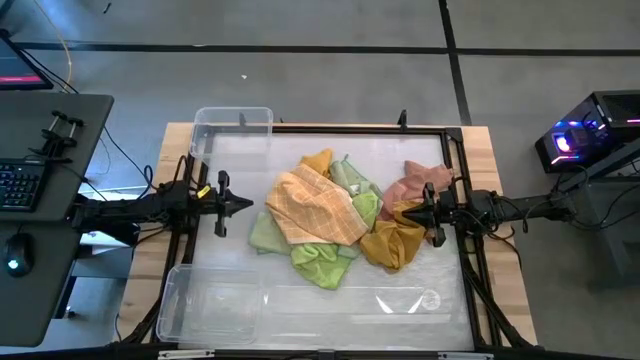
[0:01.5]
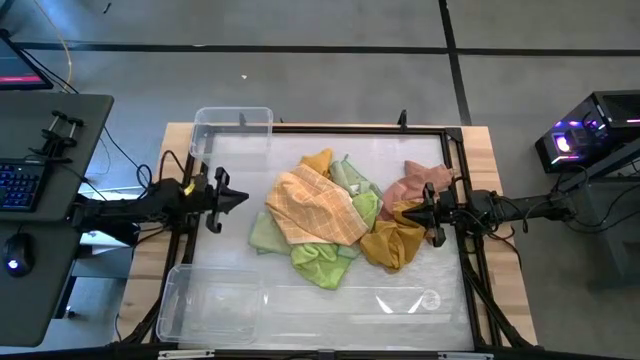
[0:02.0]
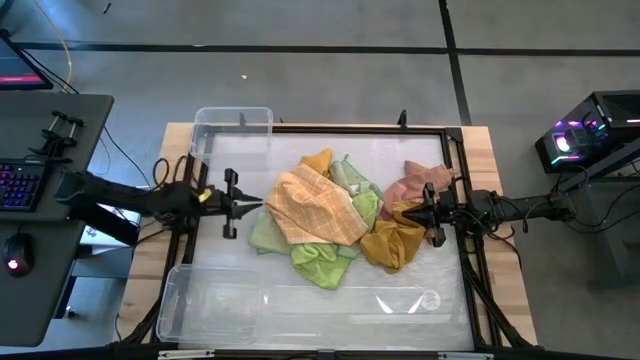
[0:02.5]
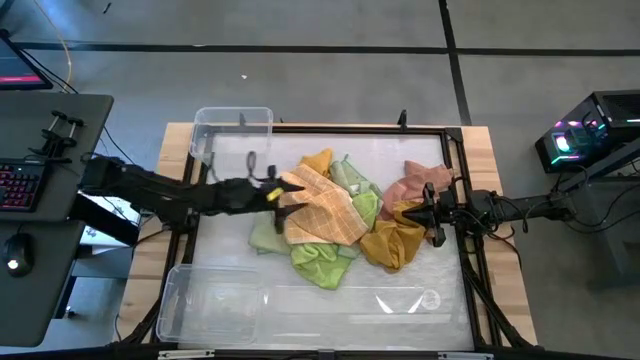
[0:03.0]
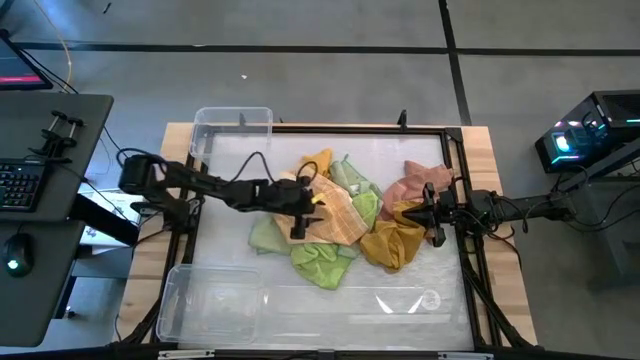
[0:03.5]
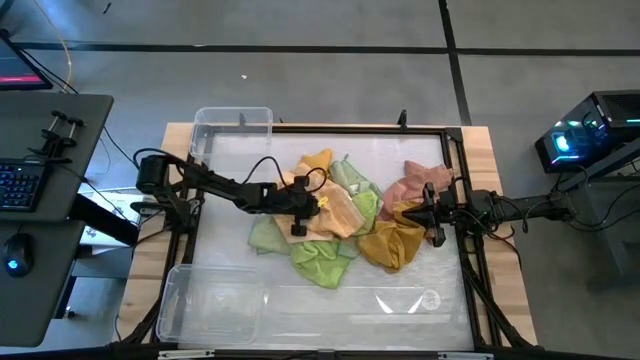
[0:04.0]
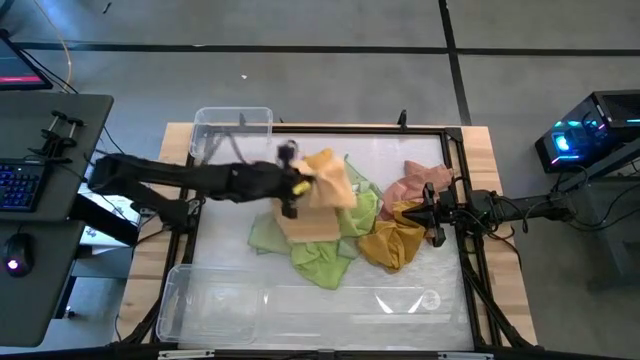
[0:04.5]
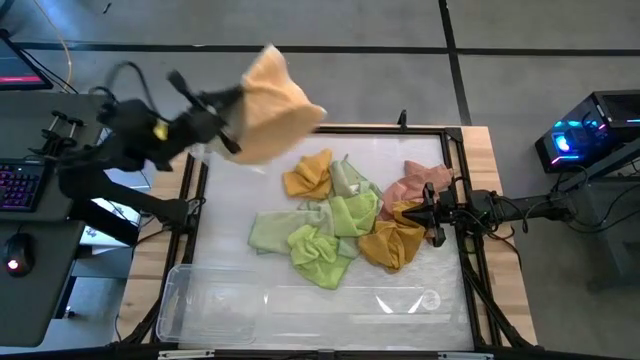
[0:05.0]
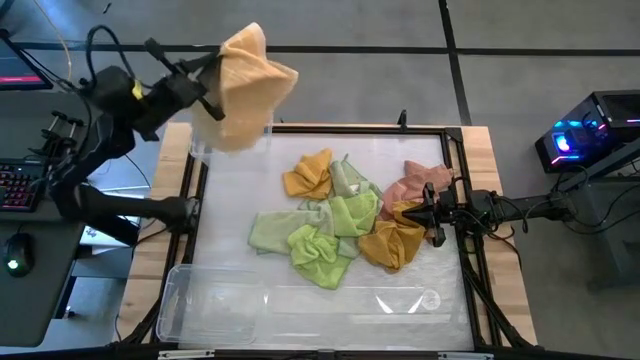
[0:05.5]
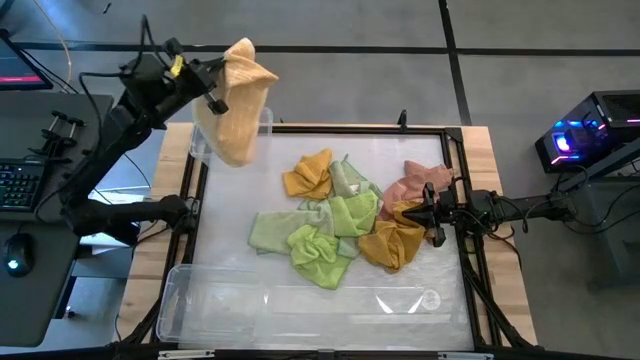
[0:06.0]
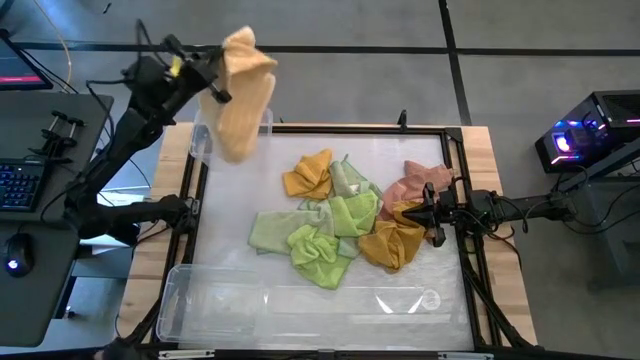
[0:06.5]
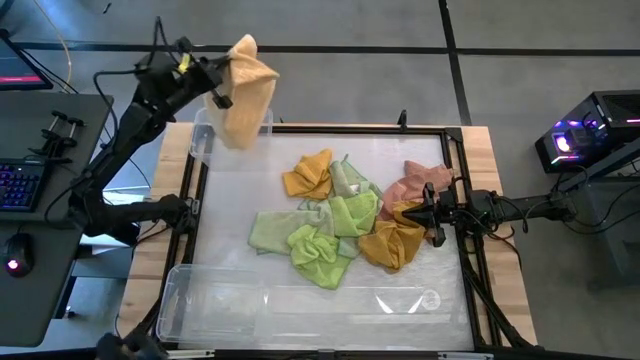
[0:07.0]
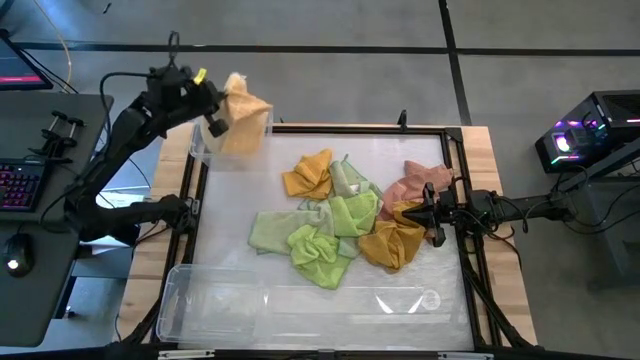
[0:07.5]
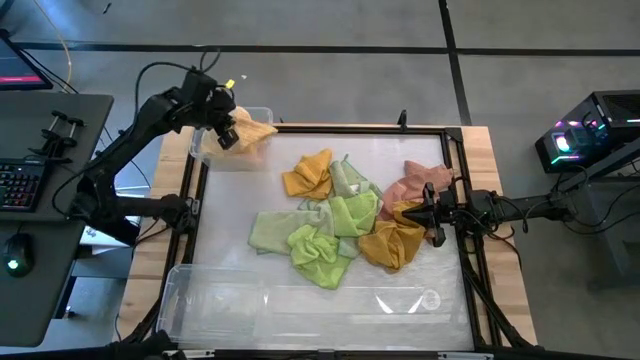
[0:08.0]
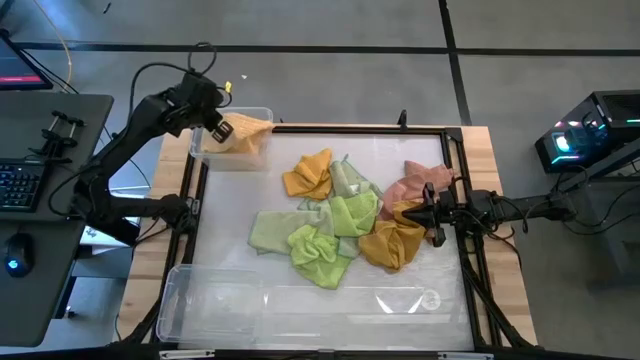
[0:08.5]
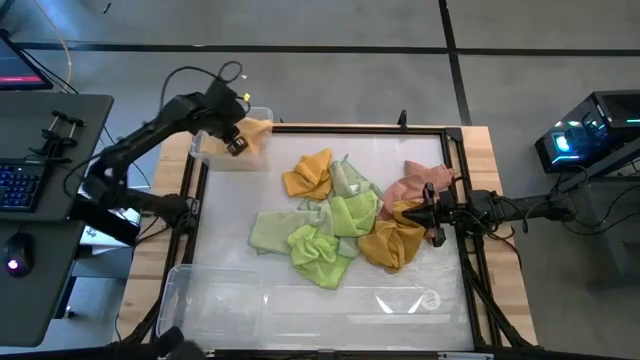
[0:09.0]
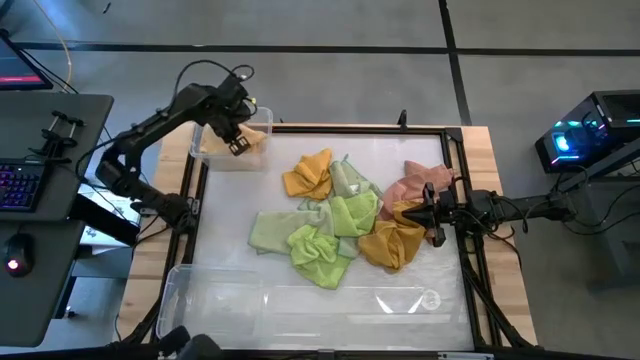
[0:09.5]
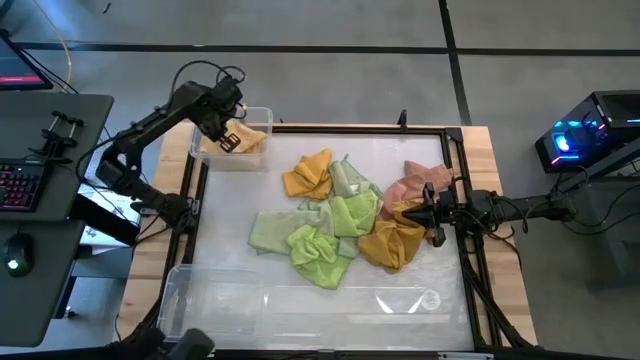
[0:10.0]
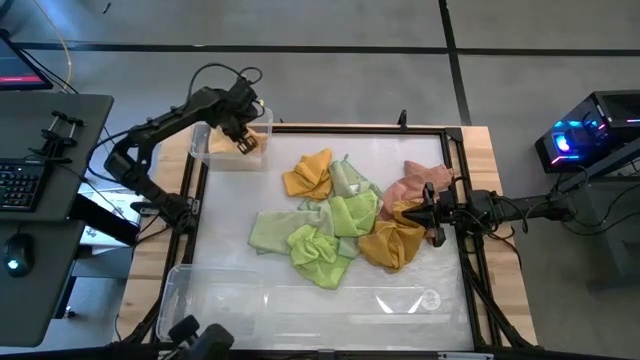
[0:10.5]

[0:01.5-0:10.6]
Task: Sort towels by color in basket
Put the orange towel into the top transparent bin

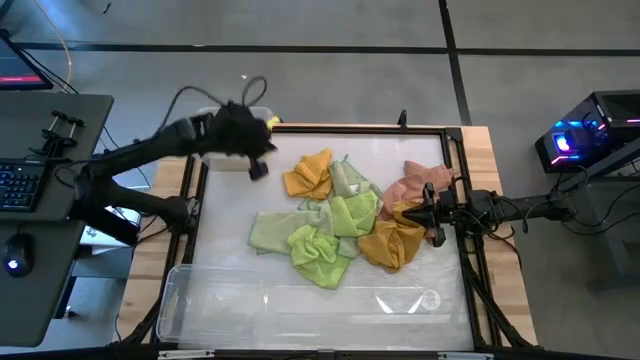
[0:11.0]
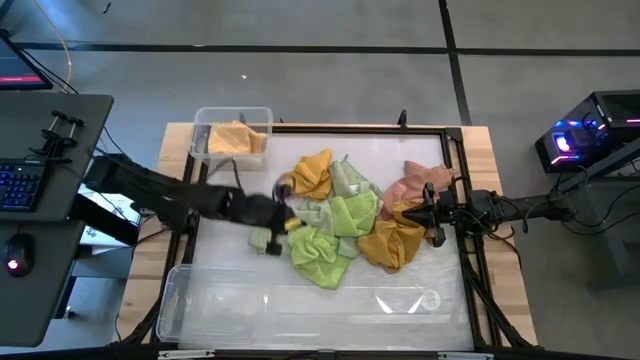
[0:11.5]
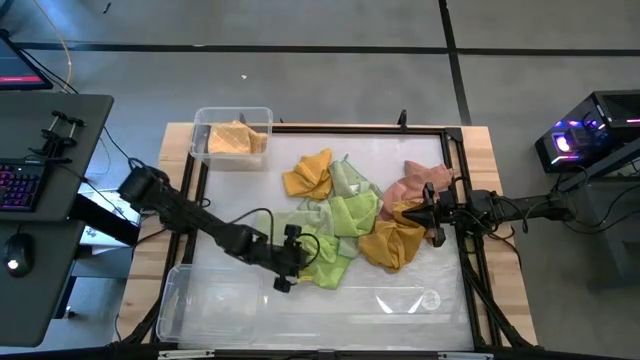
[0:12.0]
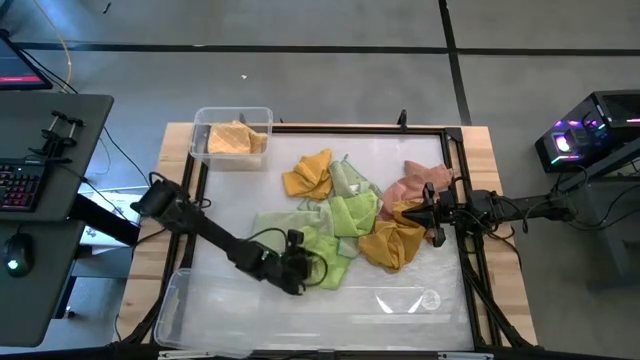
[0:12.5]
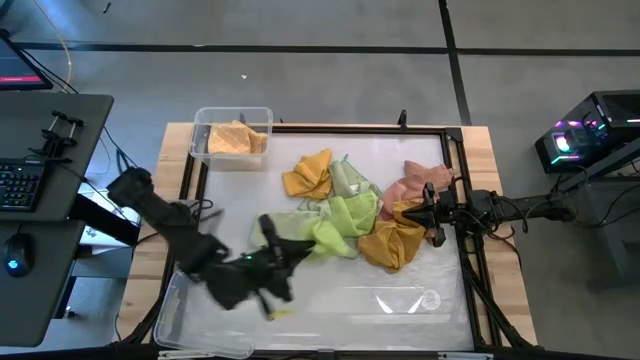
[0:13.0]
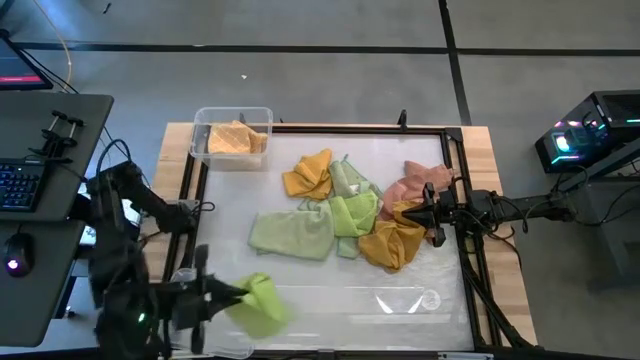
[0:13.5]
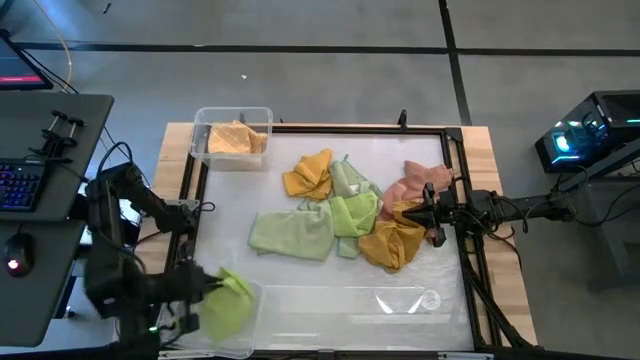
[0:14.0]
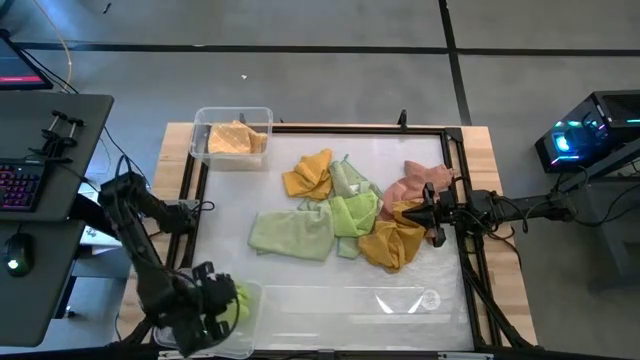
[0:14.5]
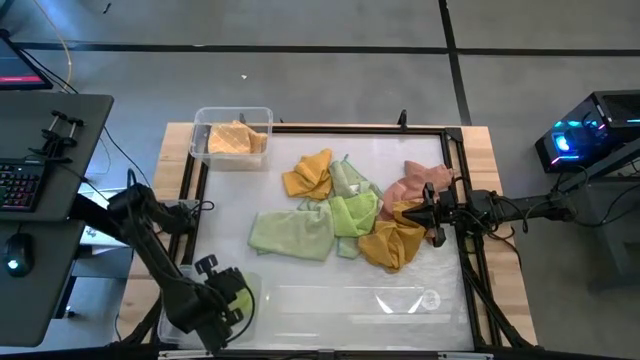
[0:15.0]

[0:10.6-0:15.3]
Put the bottom light green towel into the bottom transparent bin

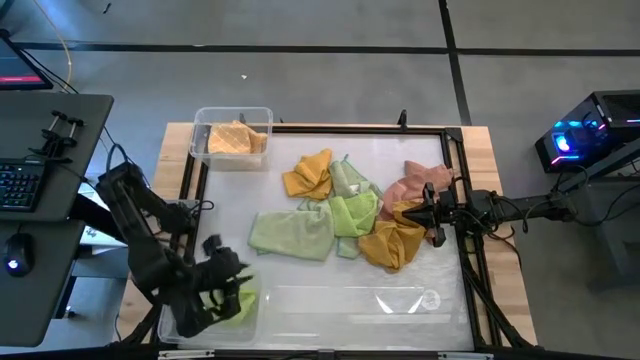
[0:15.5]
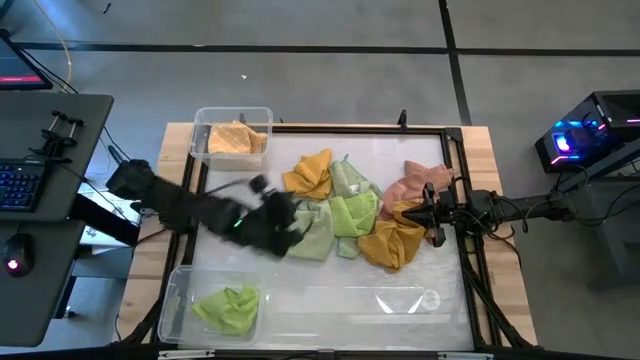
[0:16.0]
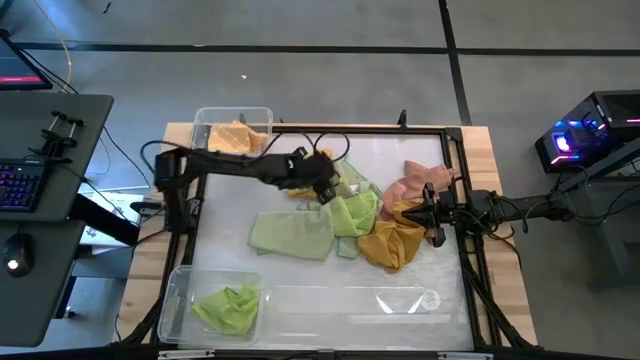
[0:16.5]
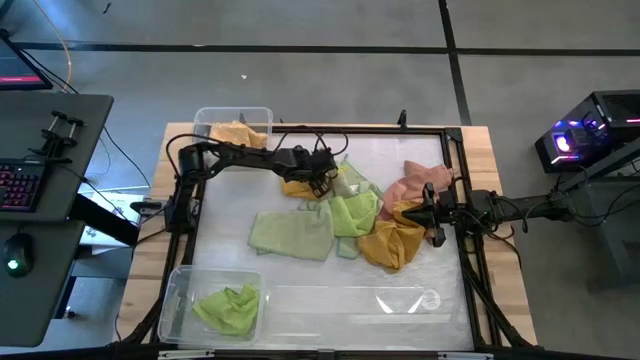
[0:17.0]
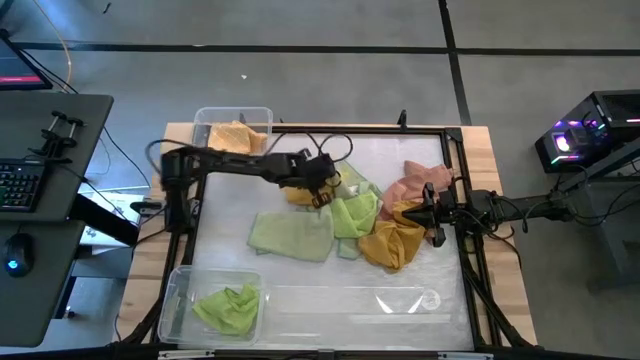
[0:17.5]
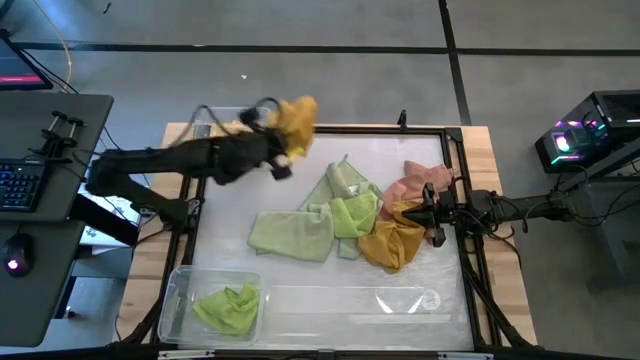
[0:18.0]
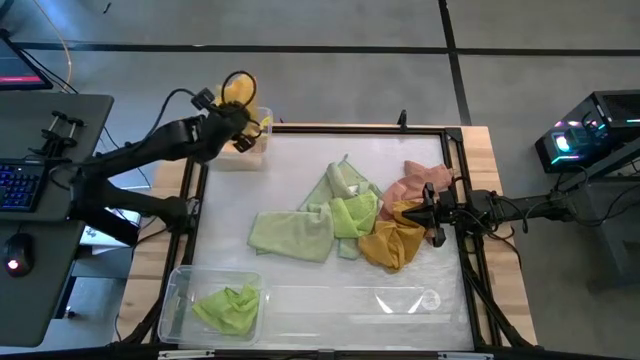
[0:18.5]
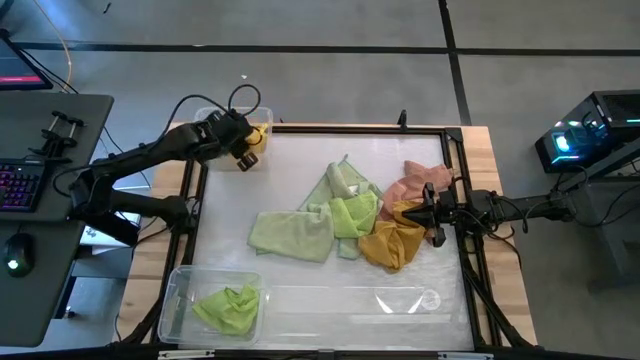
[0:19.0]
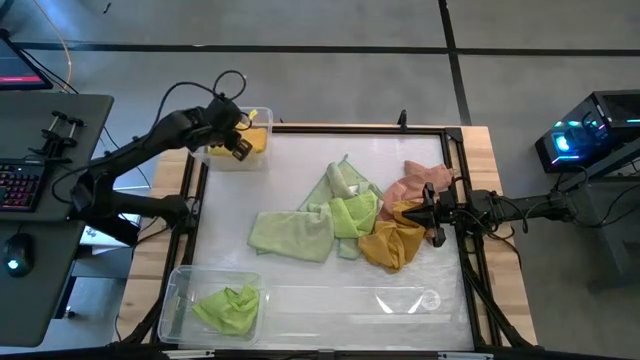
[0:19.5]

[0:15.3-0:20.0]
Put the light orange towel into the top transparent bin

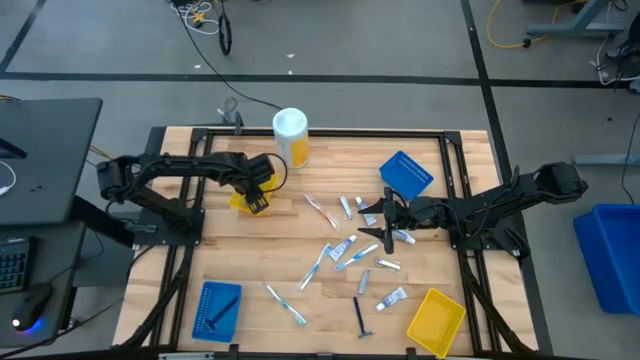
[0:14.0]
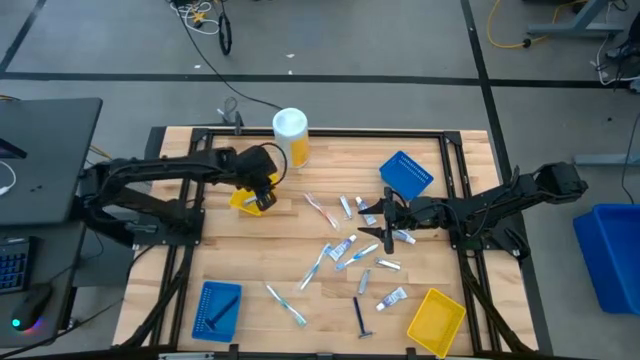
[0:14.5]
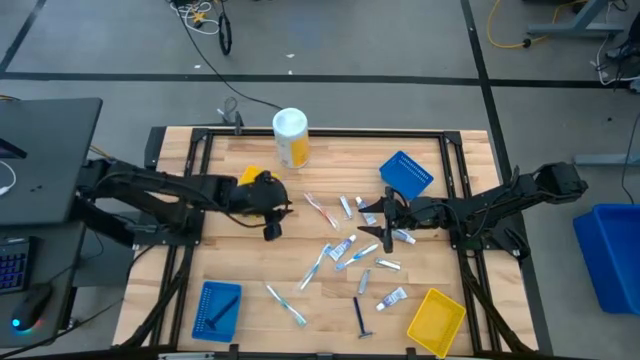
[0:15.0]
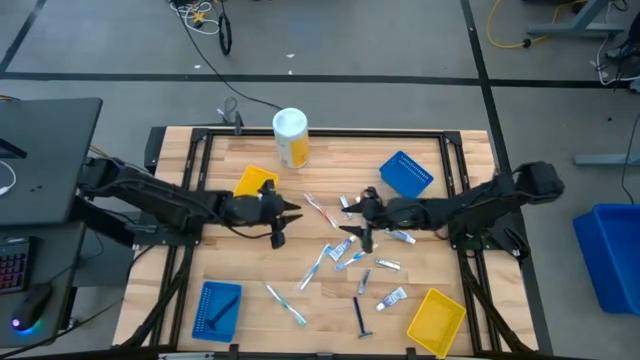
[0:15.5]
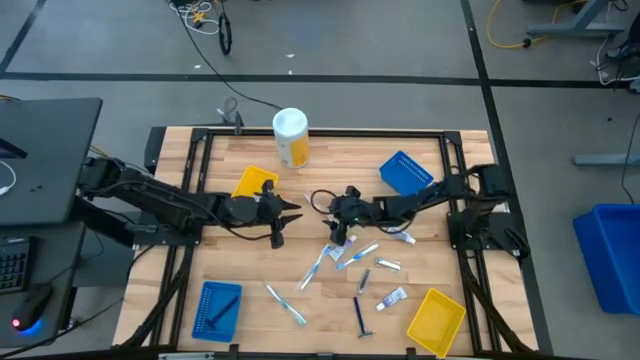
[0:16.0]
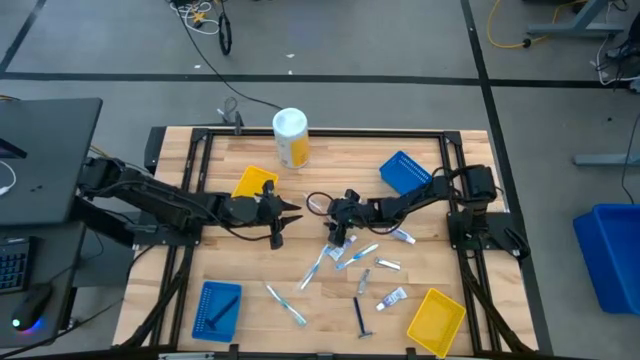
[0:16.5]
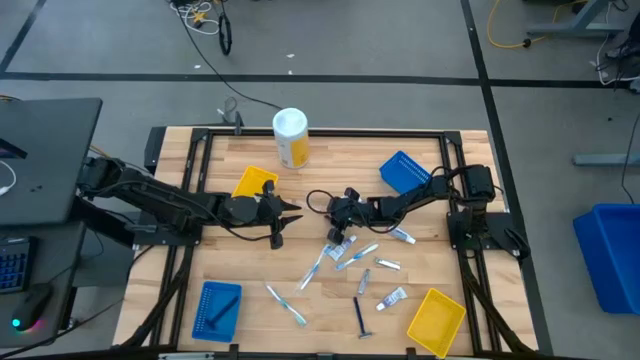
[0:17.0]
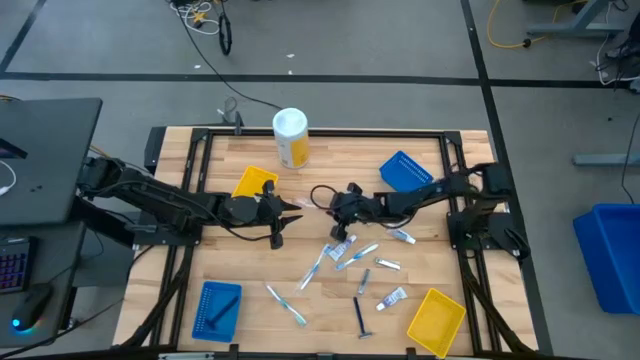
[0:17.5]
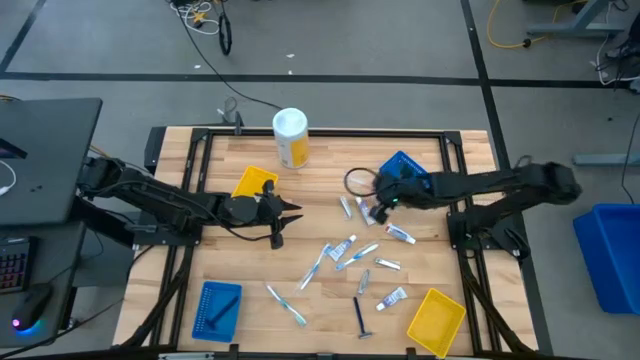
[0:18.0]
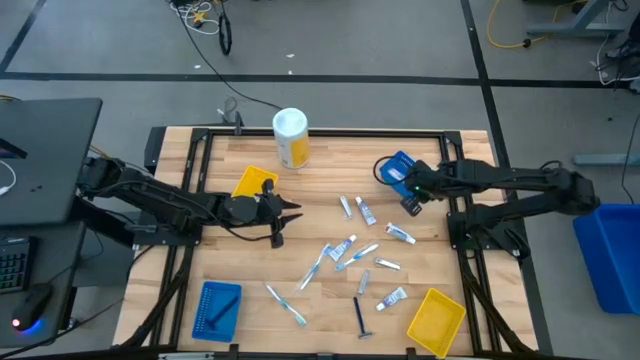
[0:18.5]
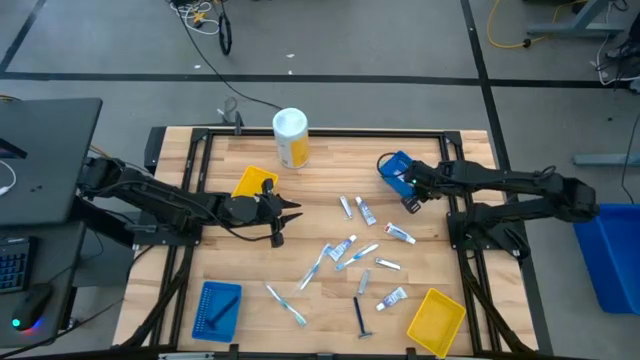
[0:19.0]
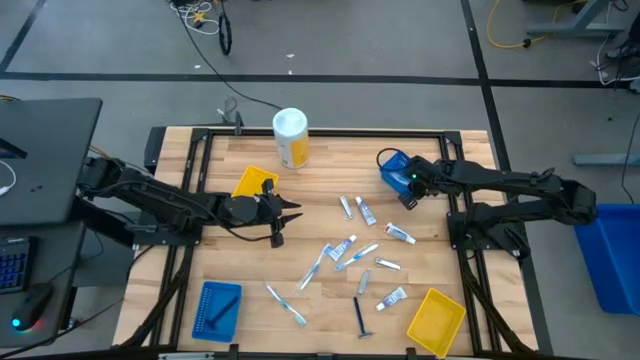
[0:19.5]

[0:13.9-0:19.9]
Task: Pick & Place Travel size toiletries
Put the red toothbrush into the top blue bin
